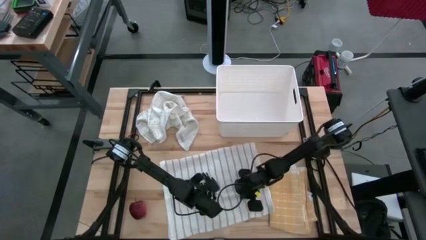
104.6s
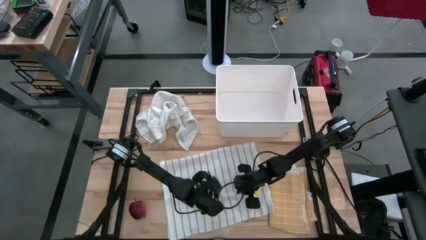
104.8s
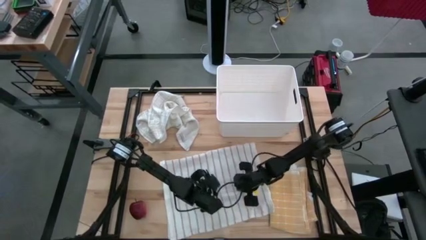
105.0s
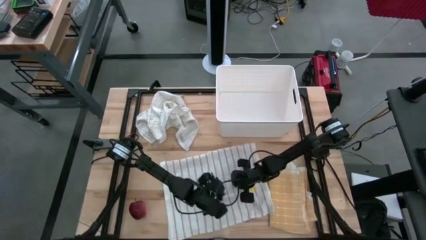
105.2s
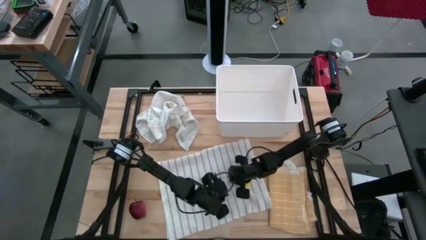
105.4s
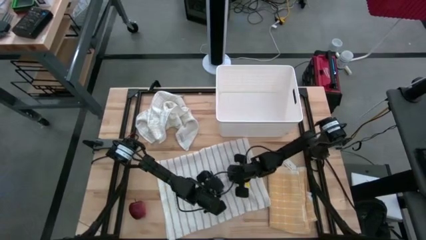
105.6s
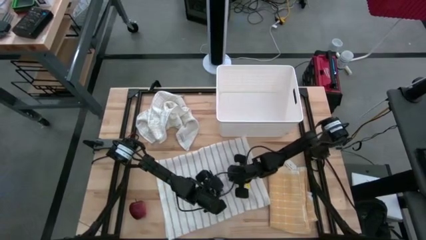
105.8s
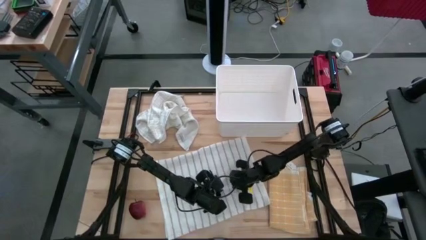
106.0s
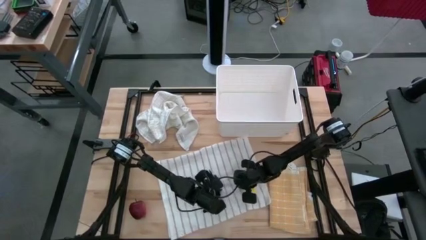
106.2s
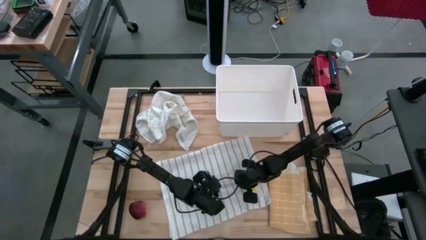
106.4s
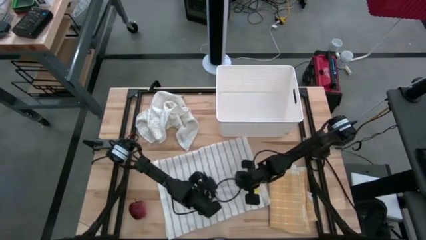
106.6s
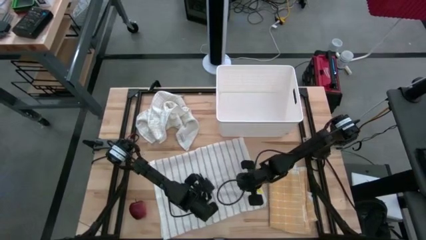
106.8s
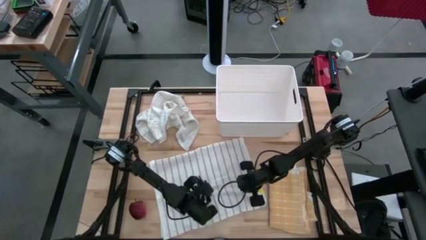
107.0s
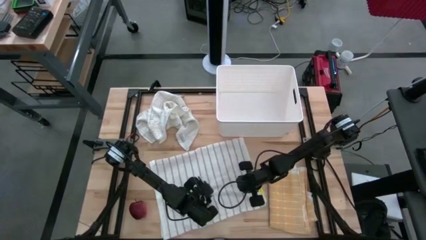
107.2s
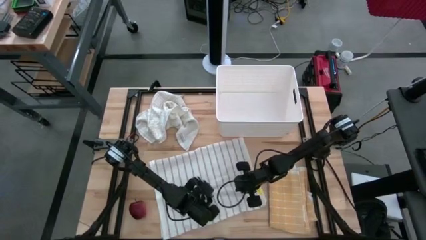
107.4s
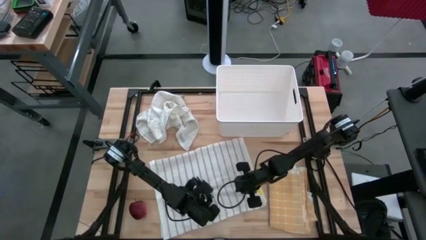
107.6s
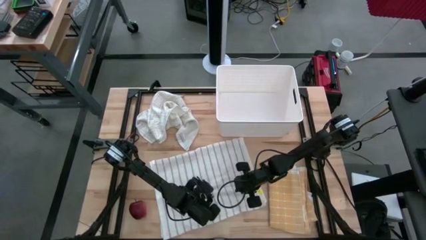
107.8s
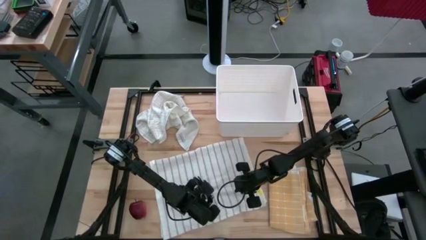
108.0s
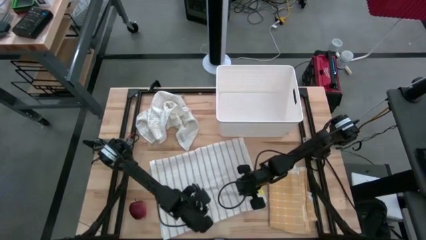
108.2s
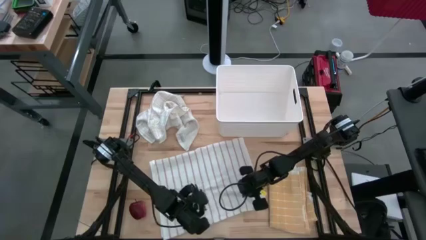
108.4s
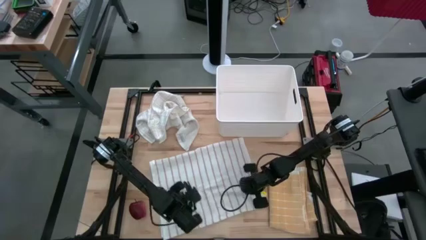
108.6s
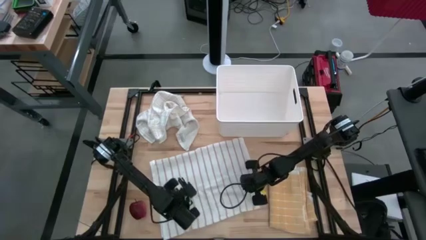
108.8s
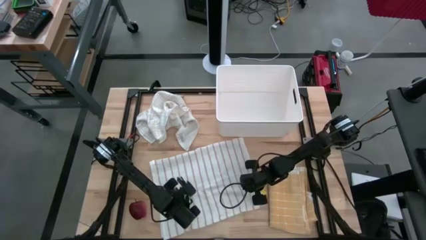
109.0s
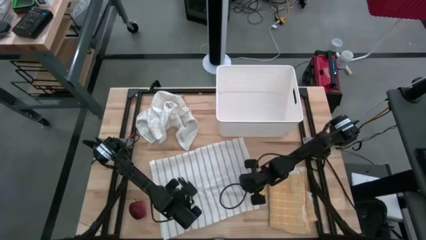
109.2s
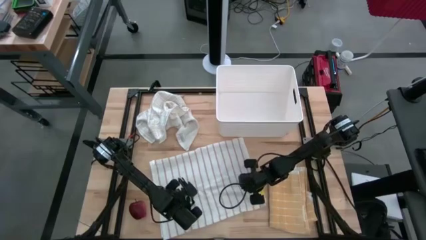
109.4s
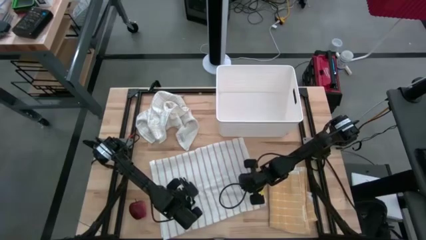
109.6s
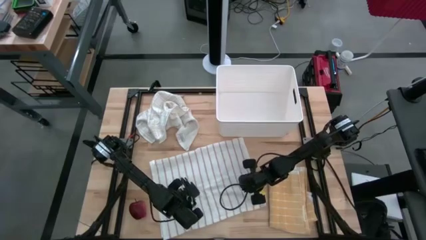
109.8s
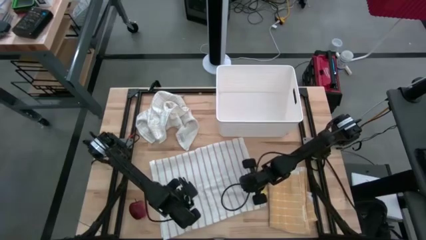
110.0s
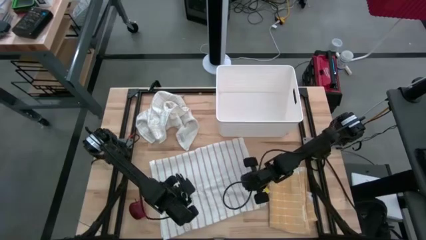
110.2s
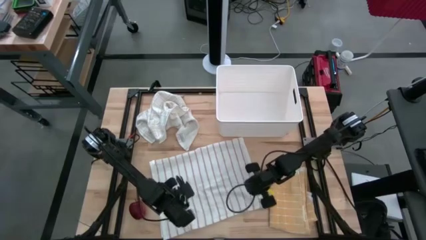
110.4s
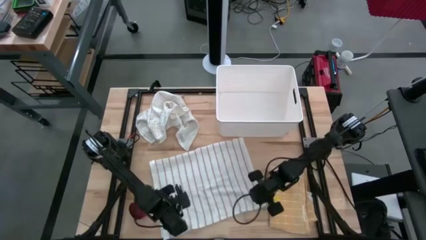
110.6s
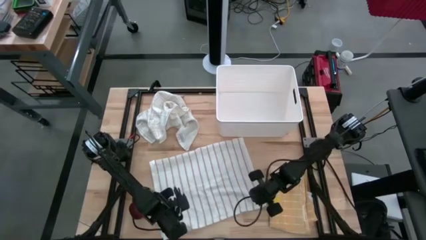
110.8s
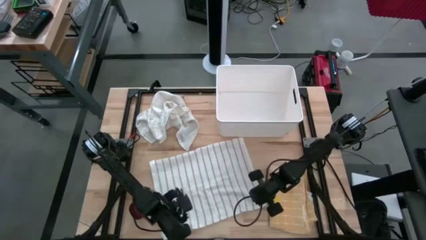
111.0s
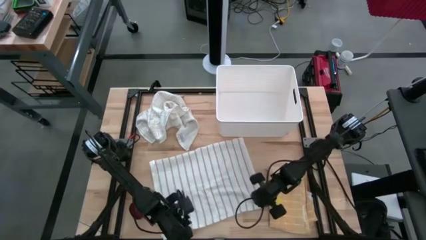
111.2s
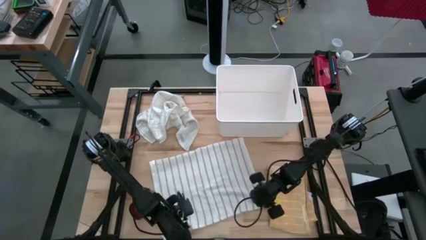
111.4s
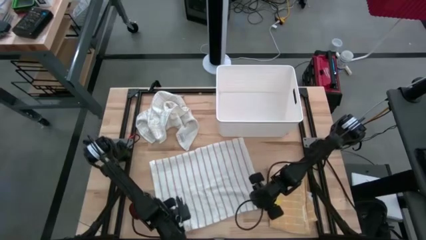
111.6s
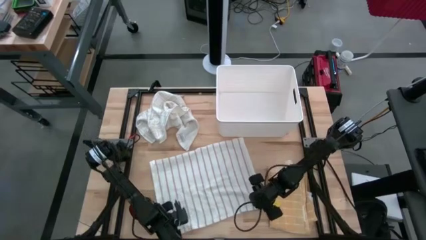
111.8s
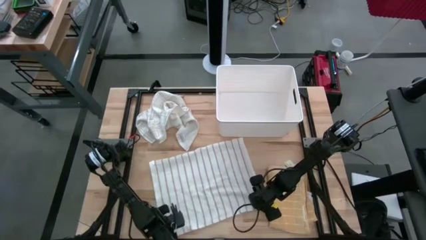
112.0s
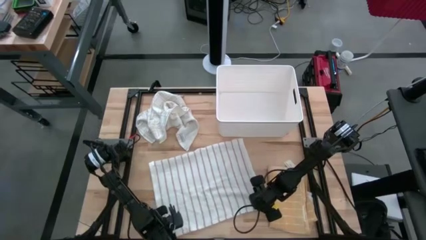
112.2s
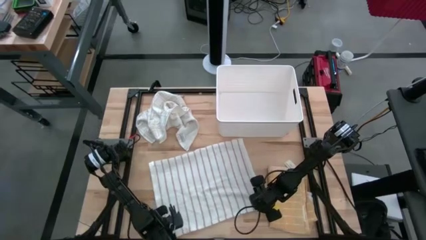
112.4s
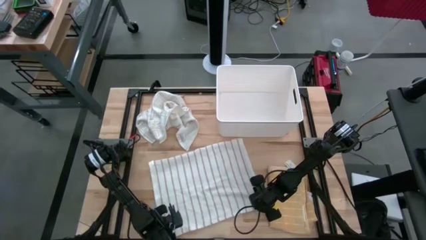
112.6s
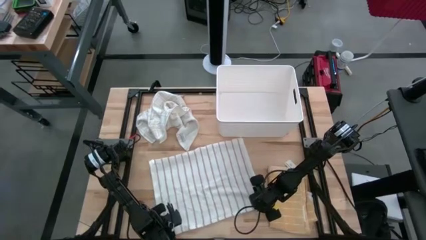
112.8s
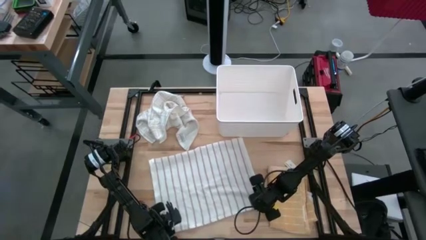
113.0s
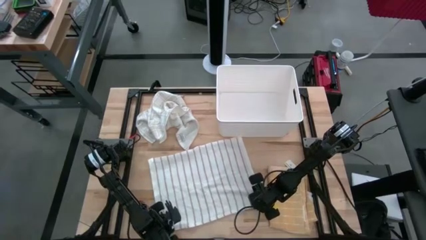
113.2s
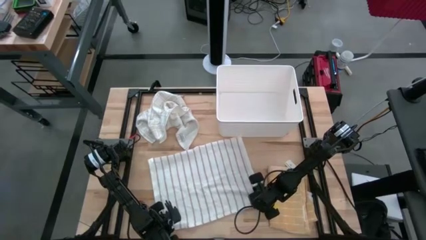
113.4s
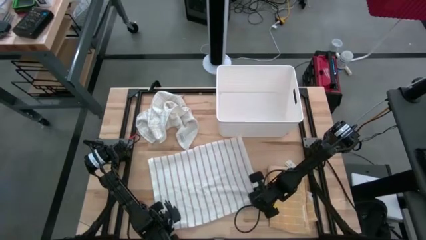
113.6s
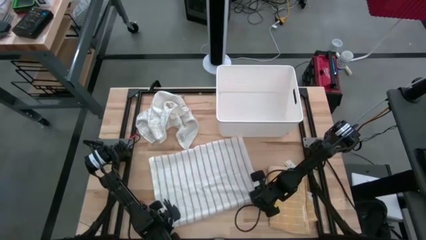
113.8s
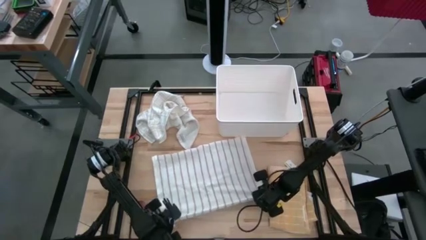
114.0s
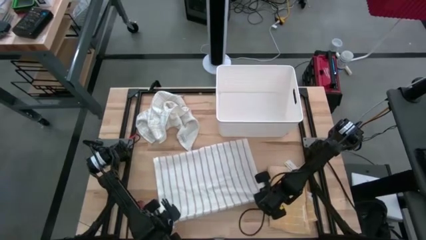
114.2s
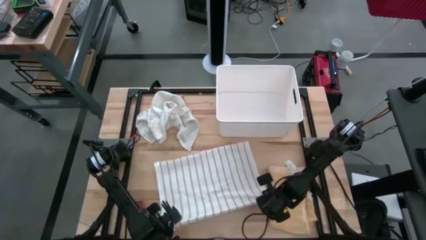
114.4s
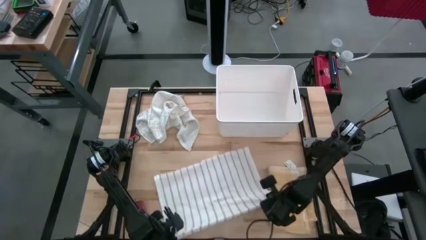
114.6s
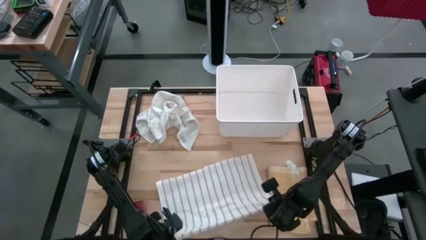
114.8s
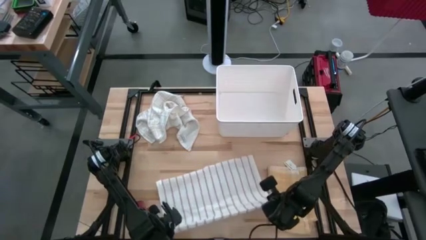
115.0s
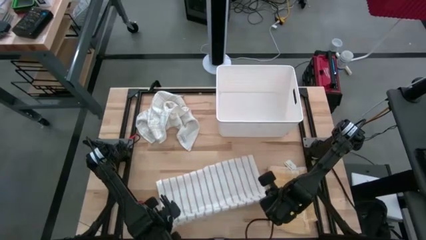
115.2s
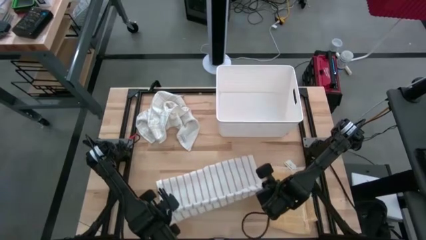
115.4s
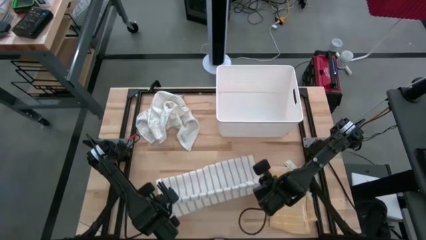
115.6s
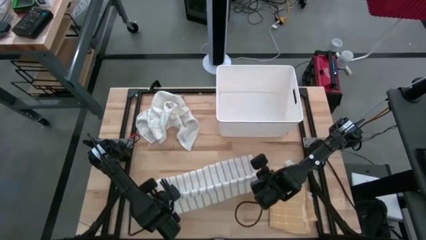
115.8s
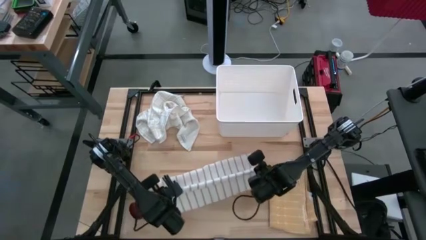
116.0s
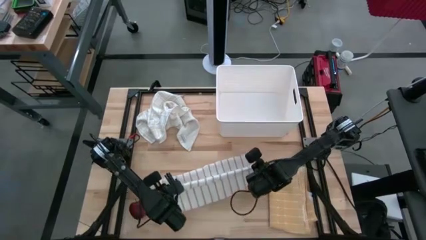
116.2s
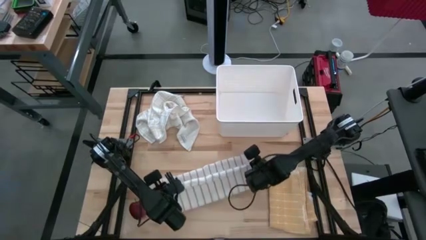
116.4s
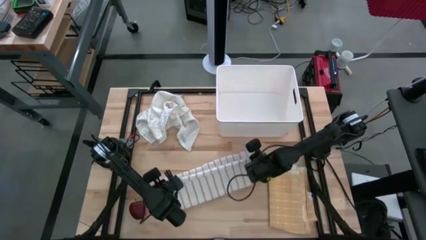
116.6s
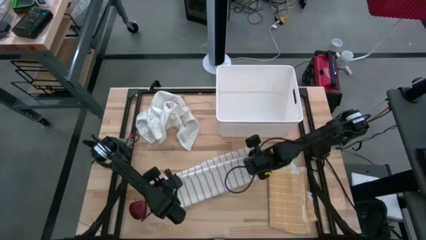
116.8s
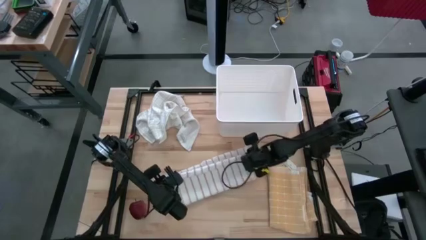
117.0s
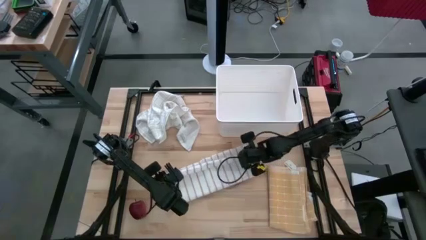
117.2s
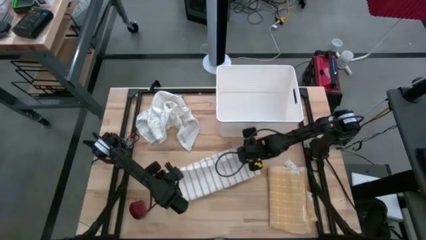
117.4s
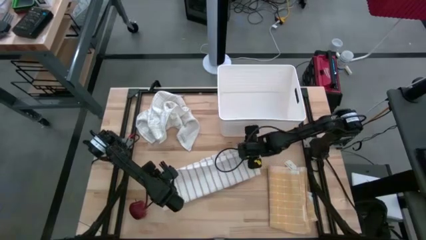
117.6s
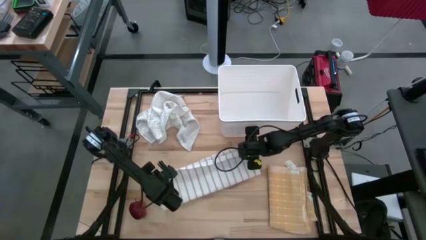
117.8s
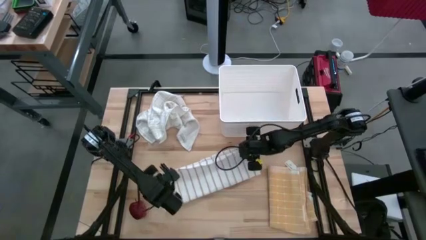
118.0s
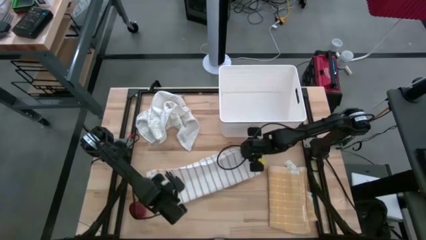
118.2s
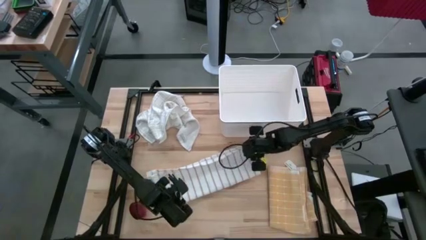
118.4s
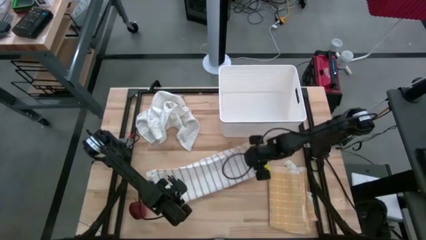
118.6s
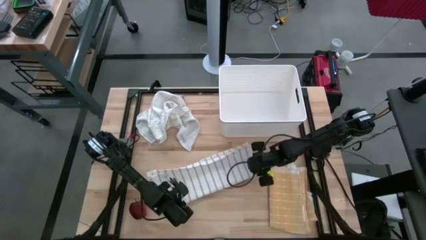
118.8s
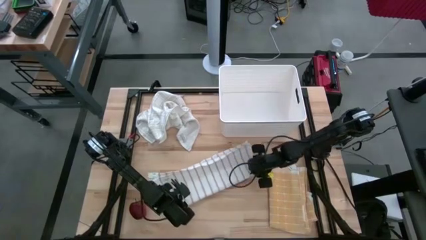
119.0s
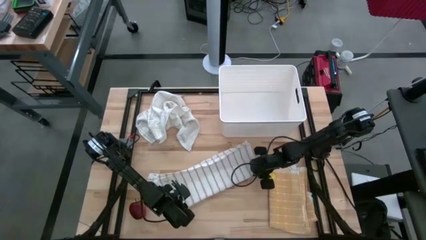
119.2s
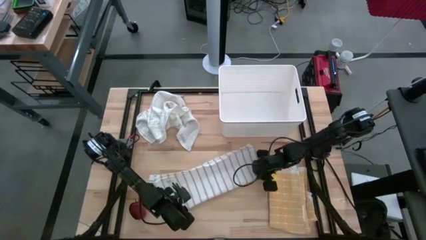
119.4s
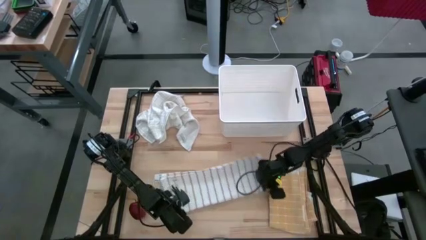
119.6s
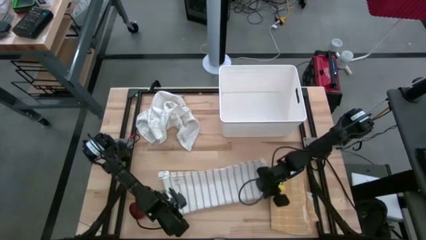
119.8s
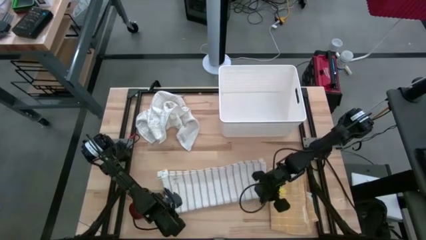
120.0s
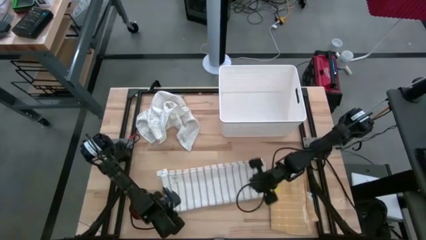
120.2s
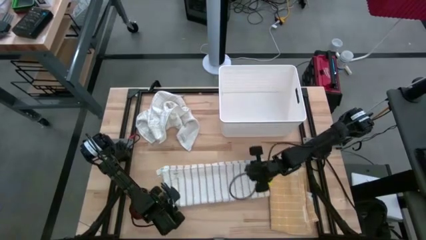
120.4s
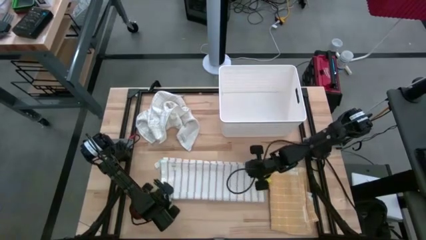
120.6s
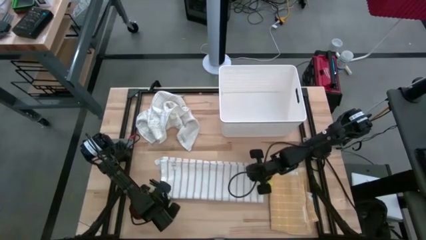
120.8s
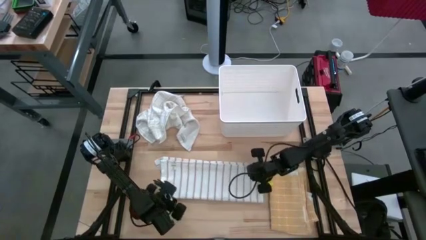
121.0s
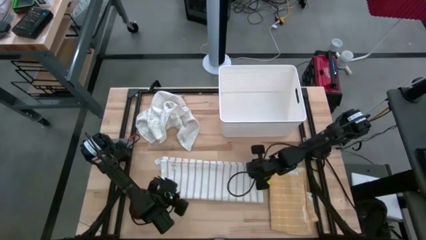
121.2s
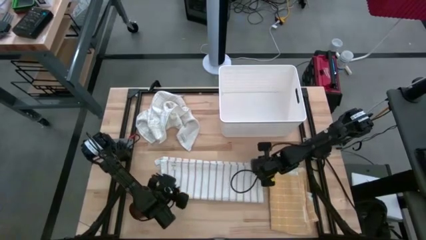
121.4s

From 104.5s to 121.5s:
Task: Fold towel
Fold the white striped towel
